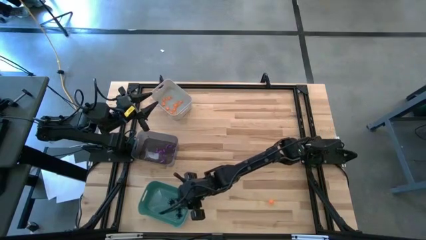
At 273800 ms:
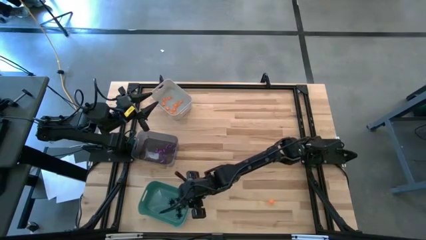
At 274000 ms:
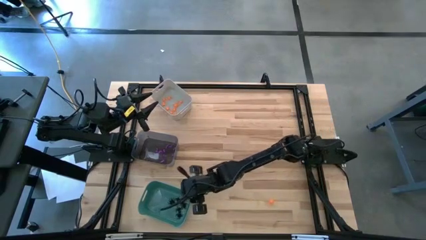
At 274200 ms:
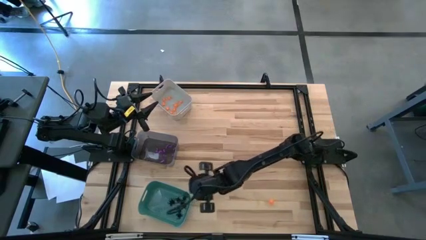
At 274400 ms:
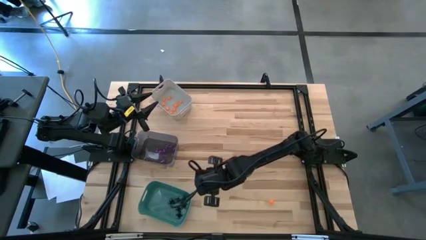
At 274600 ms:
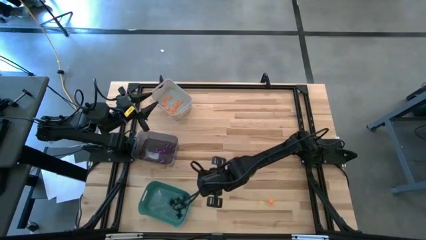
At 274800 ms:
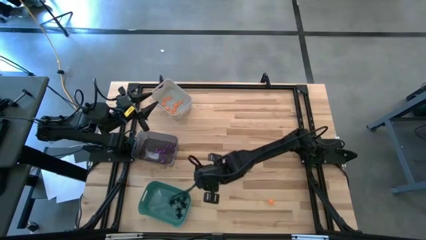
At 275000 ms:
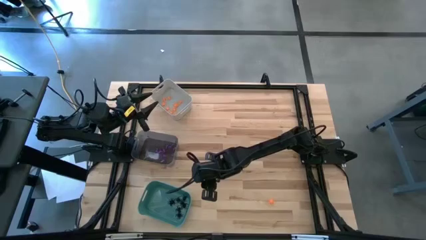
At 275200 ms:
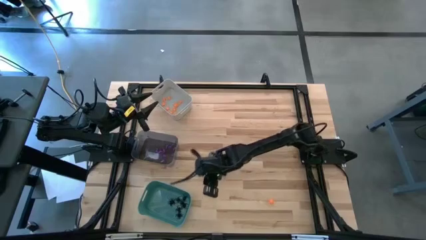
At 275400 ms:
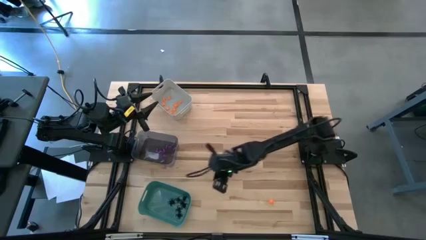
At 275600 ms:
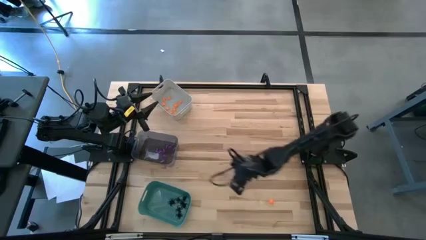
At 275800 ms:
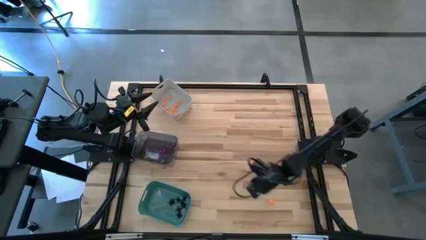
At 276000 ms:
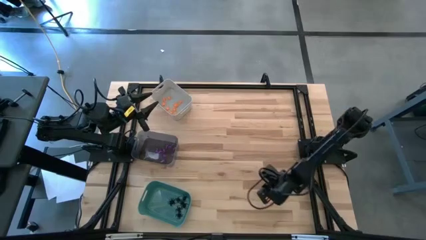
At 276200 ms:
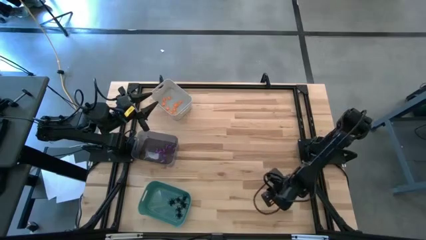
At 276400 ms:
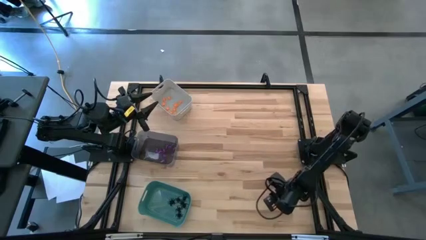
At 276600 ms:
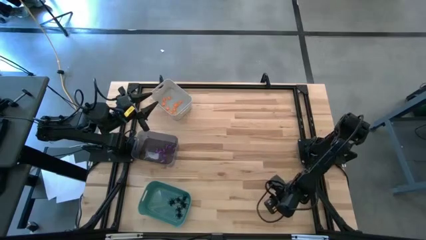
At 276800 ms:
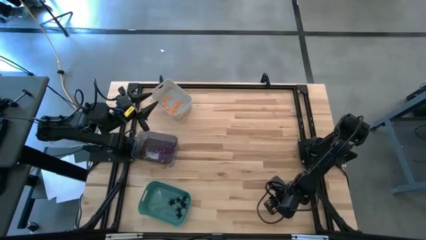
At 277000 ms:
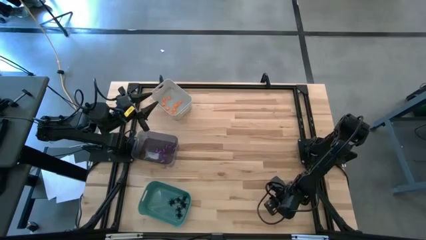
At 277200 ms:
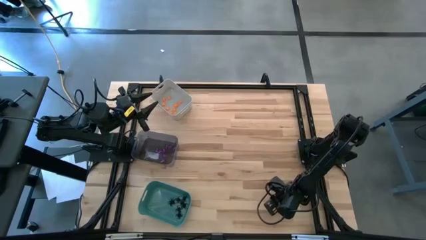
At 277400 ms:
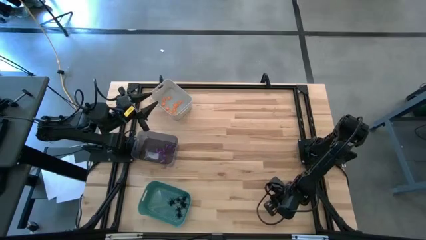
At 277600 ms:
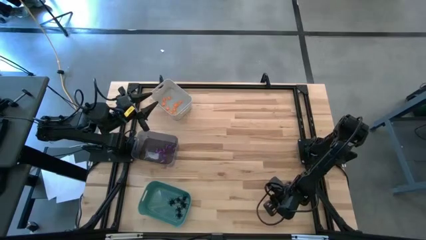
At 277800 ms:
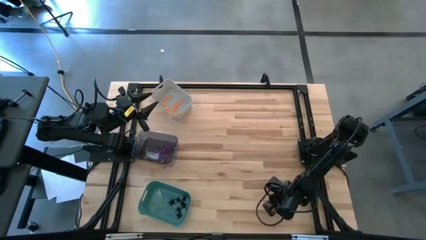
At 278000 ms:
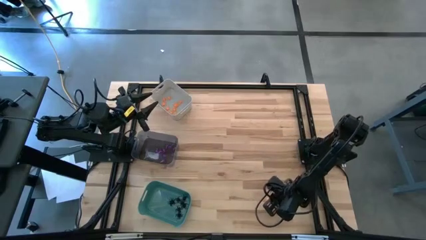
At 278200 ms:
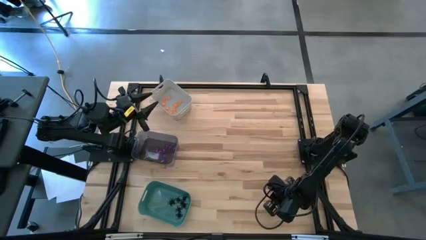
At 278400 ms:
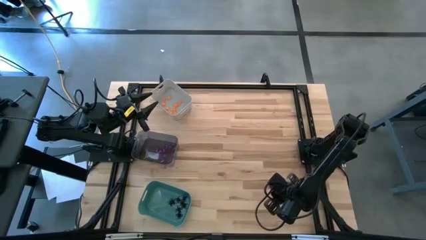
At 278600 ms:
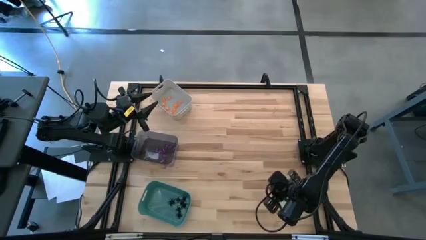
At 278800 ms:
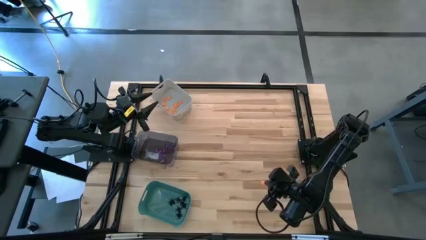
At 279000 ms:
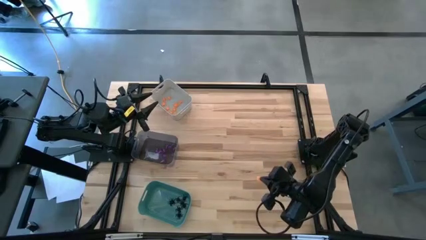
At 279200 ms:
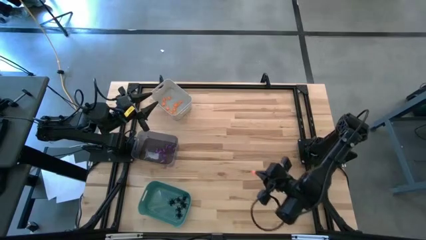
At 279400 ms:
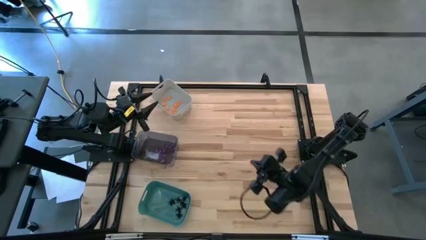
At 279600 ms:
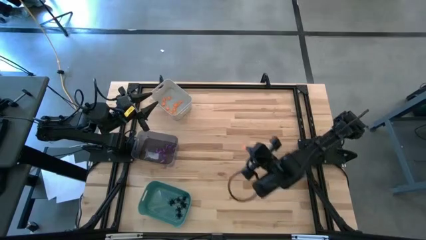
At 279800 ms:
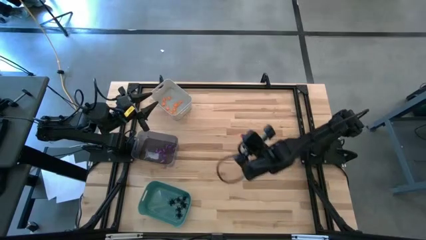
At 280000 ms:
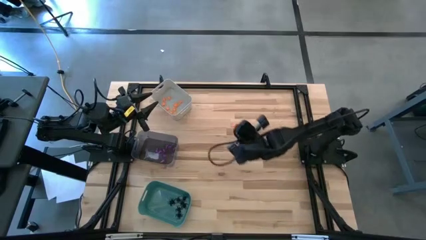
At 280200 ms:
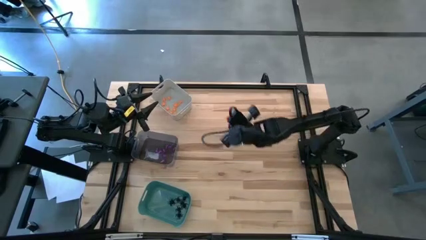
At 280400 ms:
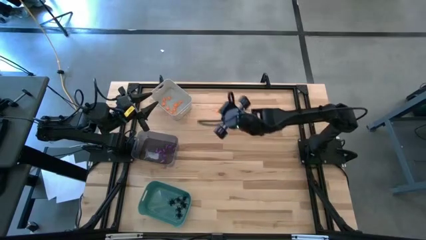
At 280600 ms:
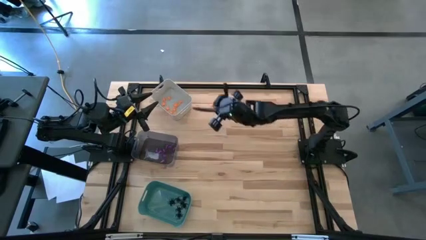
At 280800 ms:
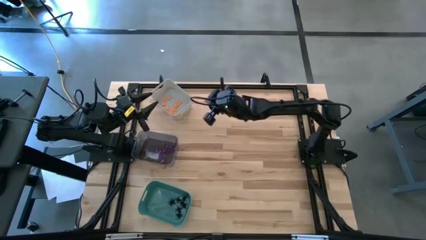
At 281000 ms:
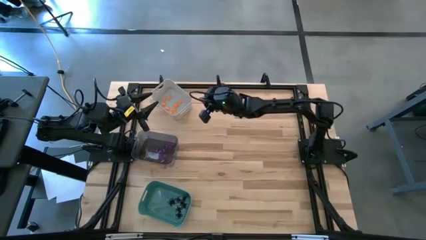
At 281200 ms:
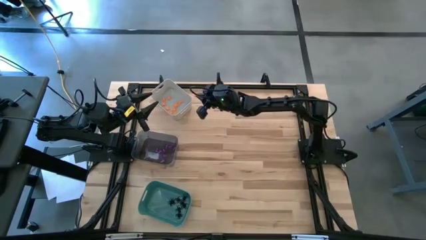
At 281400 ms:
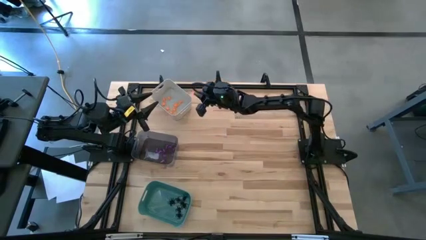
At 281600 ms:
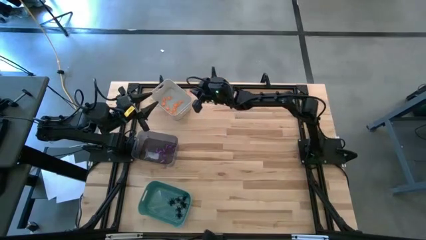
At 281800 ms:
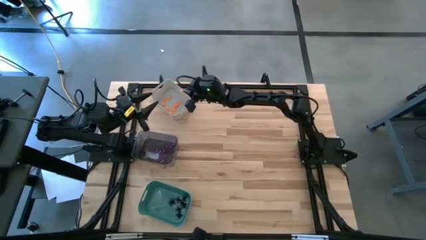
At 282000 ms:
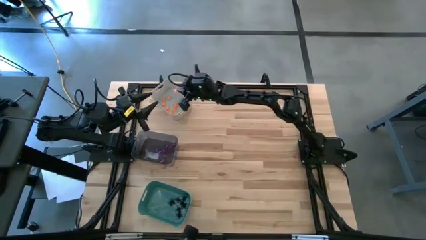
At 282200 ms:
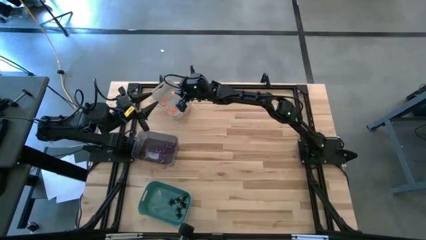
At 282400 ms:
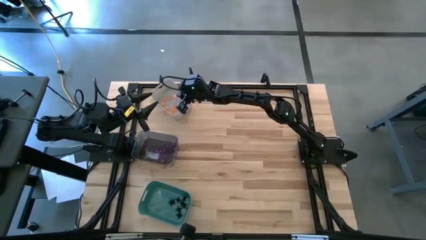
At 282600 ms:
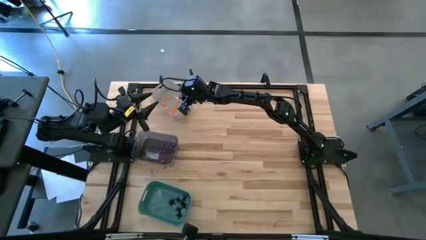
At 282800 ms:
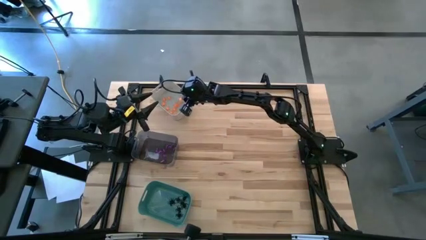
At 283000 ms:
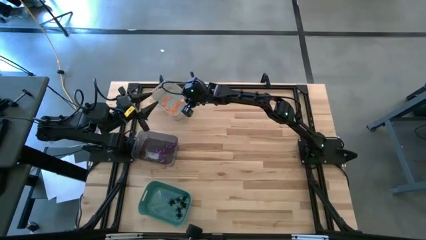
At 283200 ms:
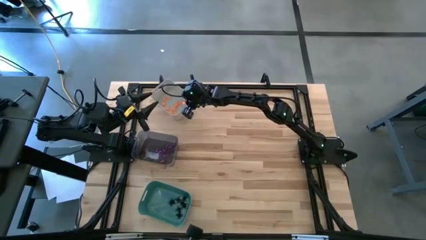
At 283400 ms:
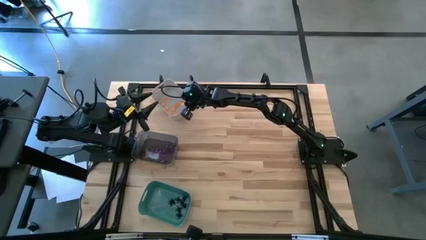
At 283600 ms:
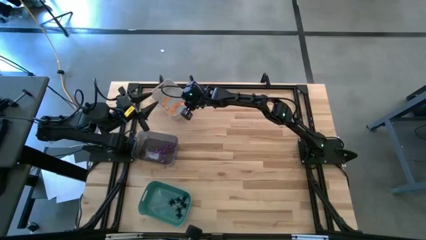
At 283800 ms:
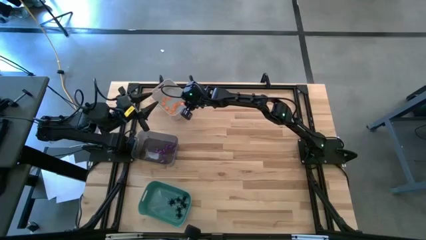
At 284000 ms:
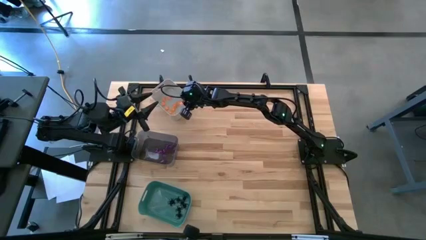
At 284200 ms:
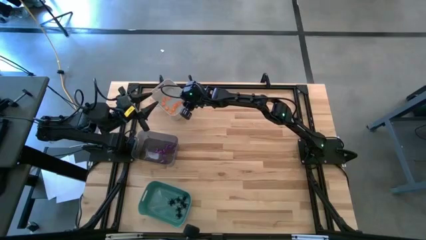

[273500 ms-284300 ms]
Task: Sort Halloween decoration
Put the orange spider into the gray bin

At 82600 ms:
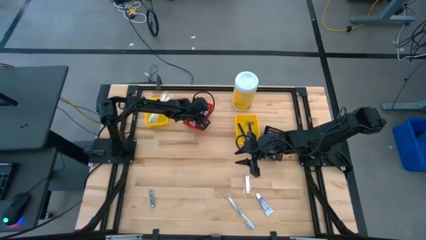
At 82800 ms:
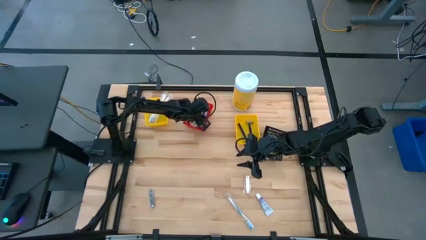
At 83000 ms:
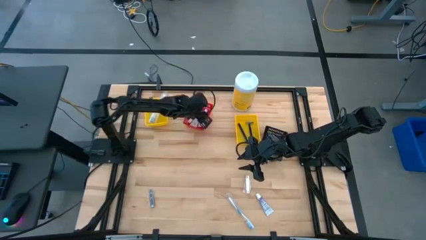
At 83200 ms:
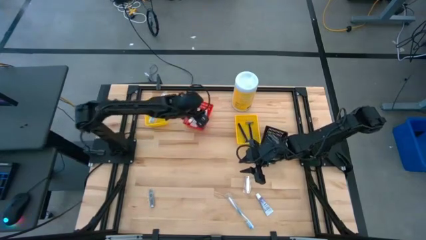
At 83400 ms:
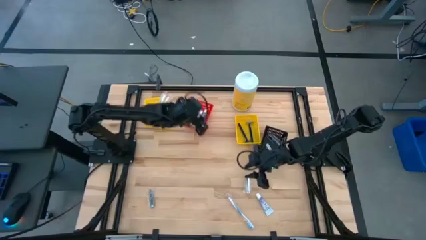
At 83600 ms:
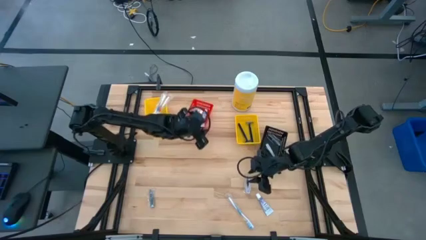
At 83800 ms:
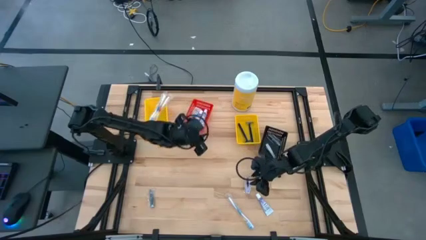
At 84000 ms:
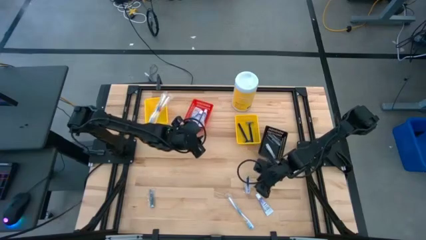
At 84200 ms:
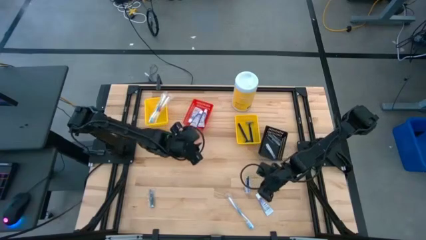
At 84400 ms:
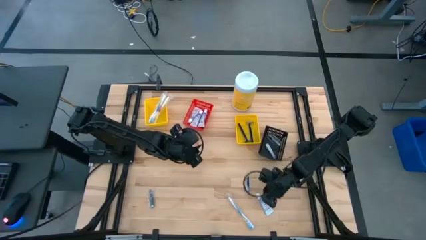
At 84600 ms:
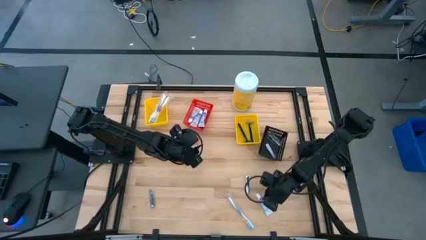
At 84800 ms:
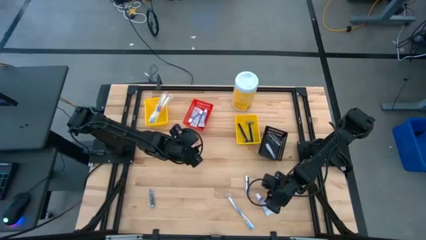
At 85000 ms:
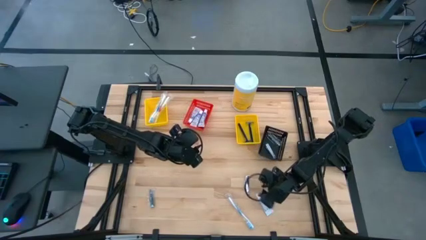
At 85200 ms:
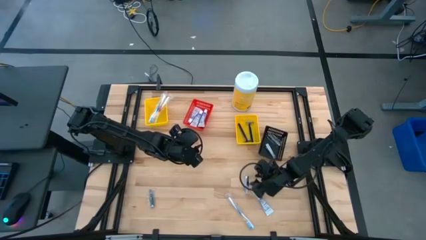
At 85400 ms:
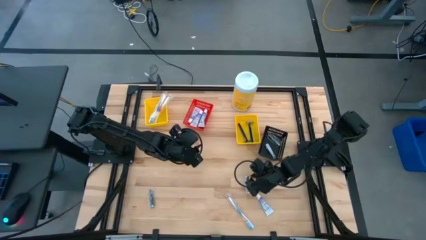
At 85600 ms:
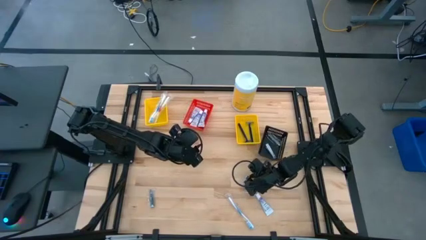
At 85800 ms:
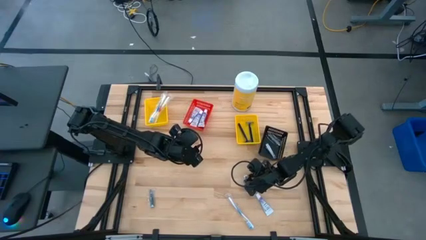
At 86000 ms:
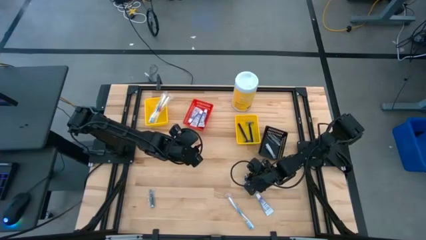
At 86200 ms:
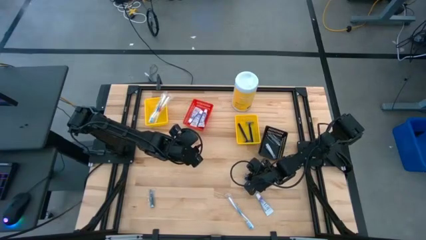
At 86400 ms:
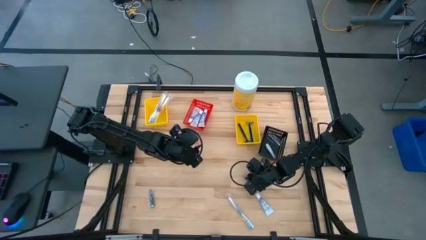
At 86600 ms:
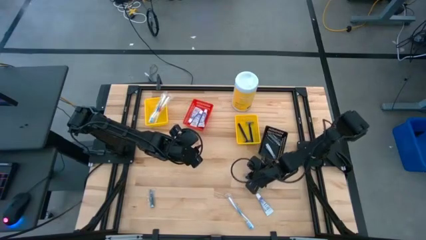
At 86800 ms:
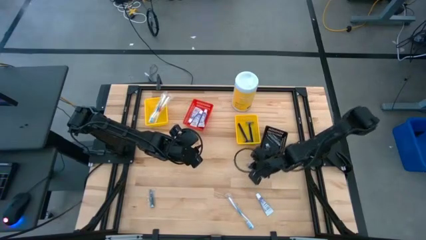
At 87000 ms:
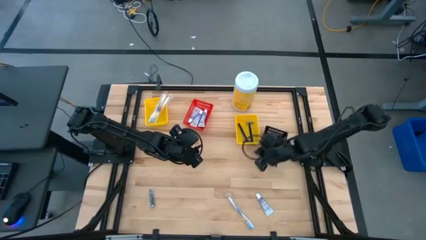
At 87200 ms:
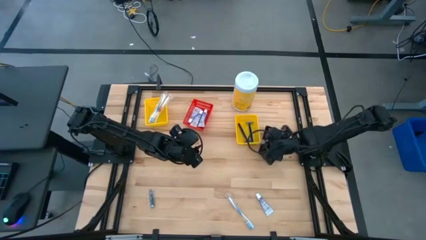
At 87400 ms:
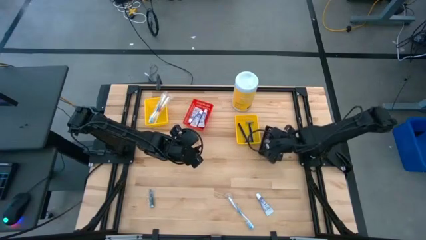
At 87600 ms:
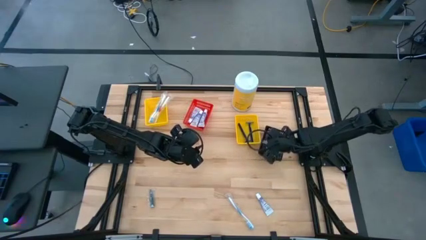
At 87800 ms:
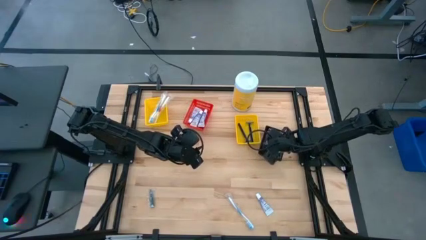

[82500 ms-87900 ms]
Task: Pick & Place Travel size toiletries
Put the silver nail cutter into the black basket
